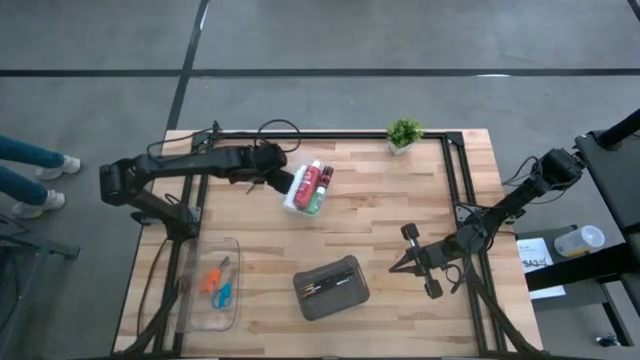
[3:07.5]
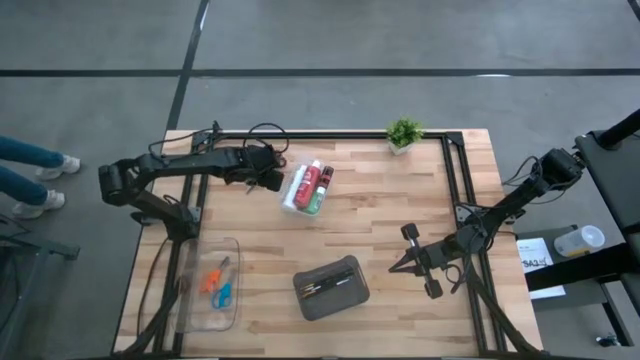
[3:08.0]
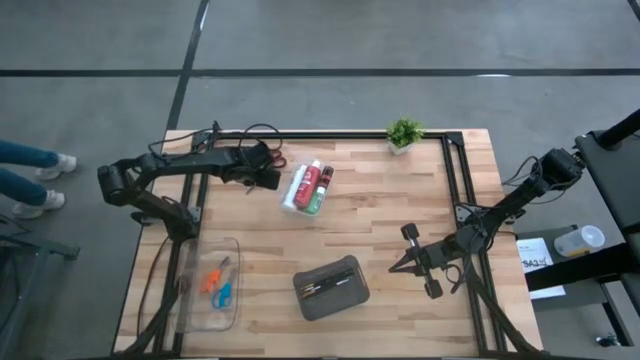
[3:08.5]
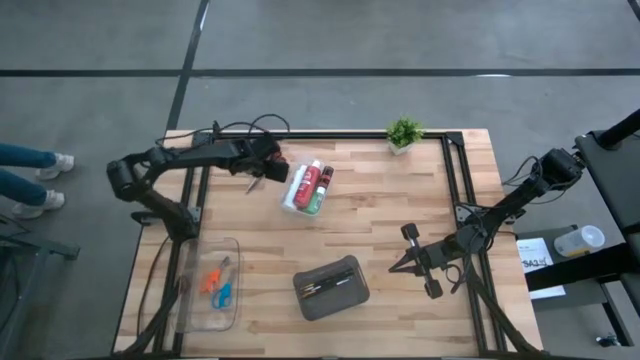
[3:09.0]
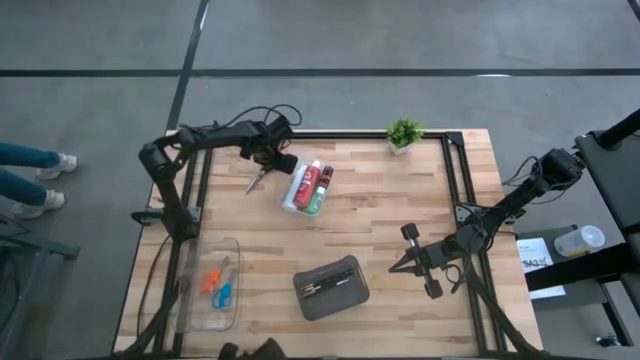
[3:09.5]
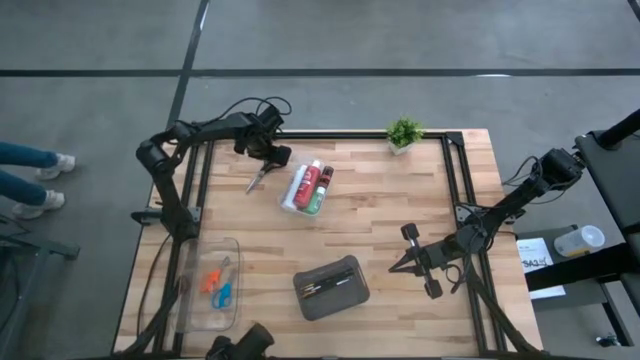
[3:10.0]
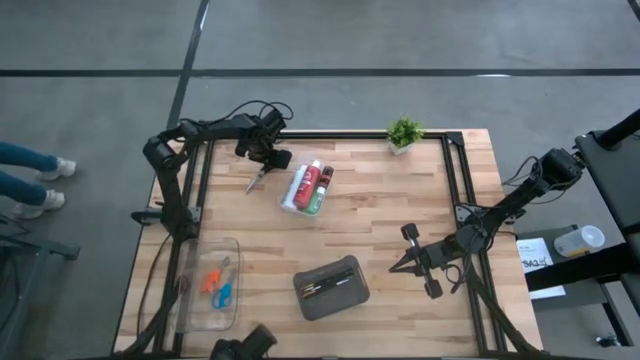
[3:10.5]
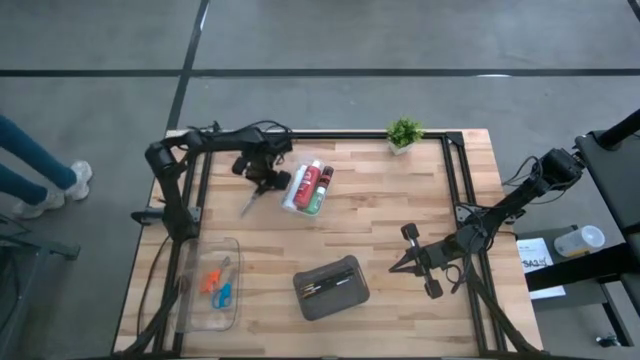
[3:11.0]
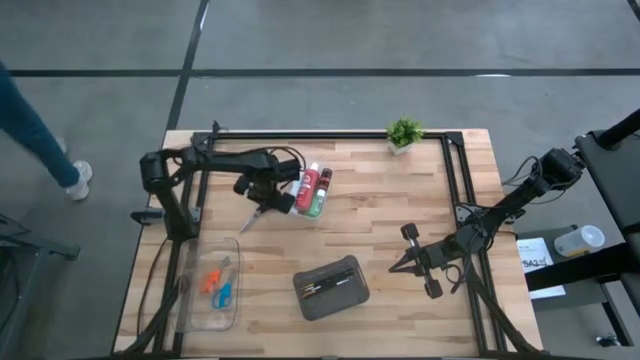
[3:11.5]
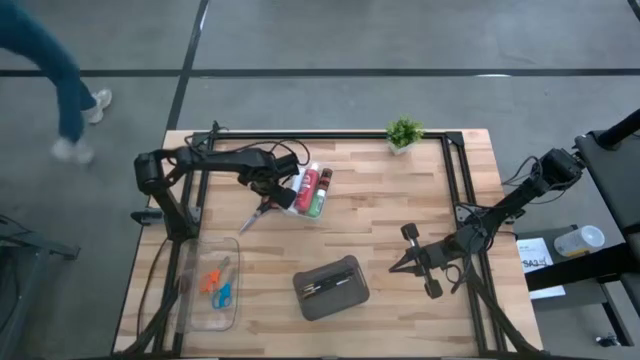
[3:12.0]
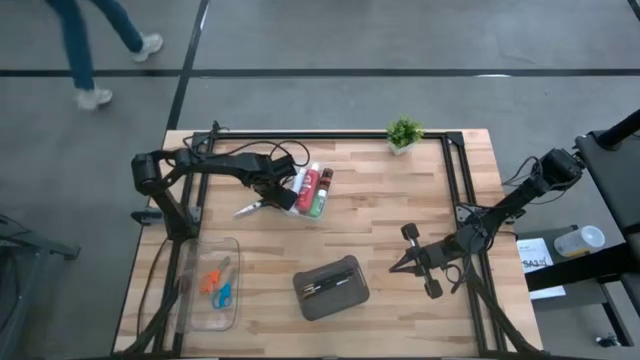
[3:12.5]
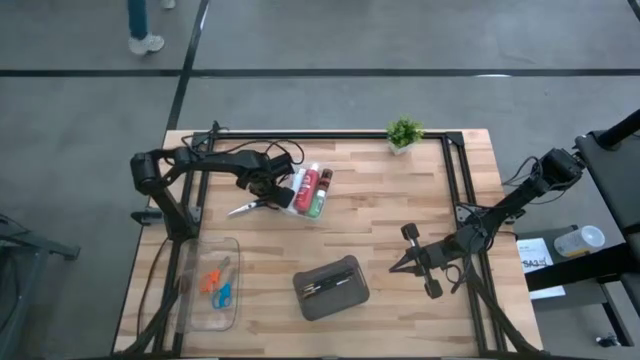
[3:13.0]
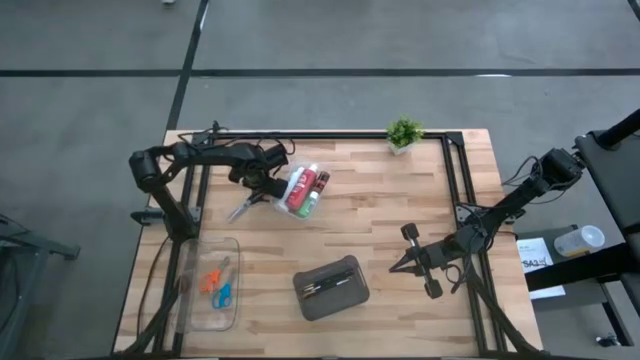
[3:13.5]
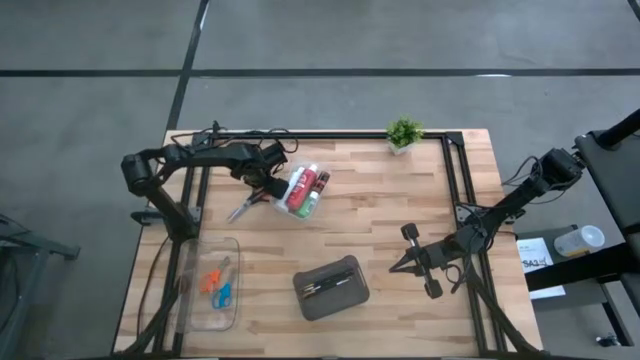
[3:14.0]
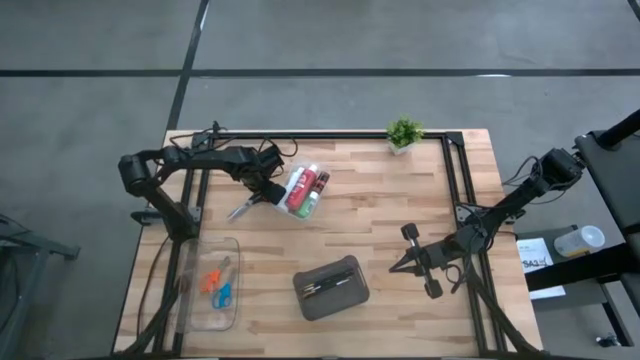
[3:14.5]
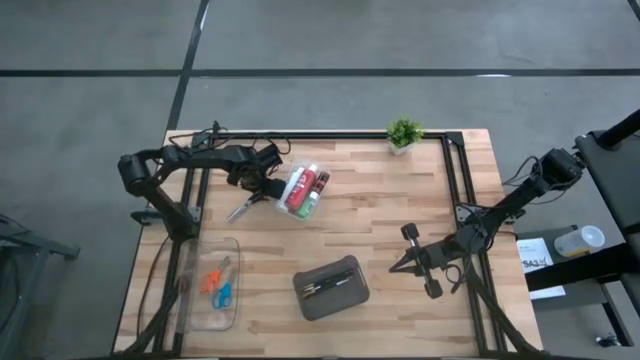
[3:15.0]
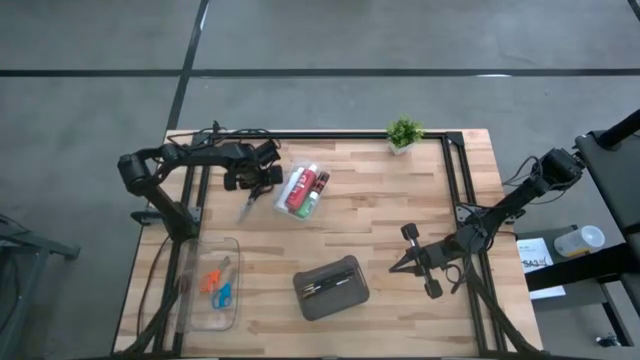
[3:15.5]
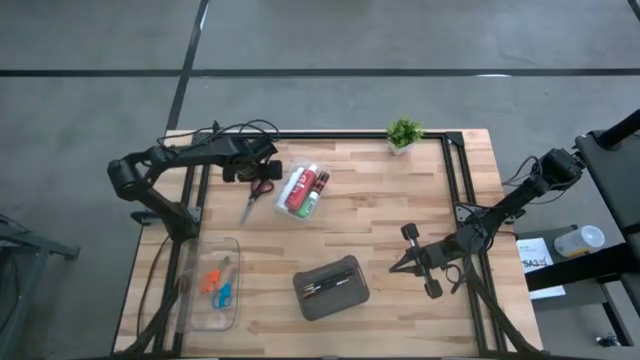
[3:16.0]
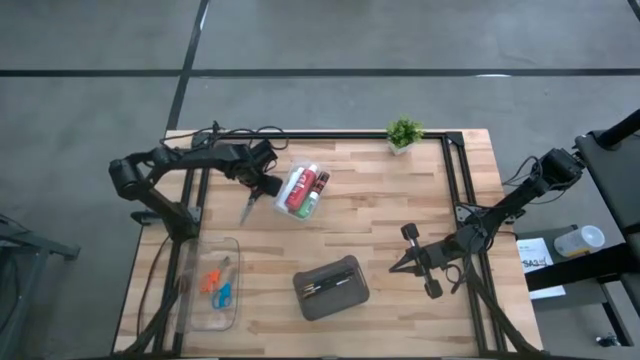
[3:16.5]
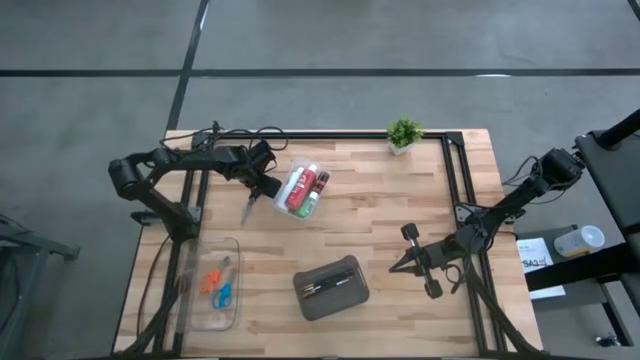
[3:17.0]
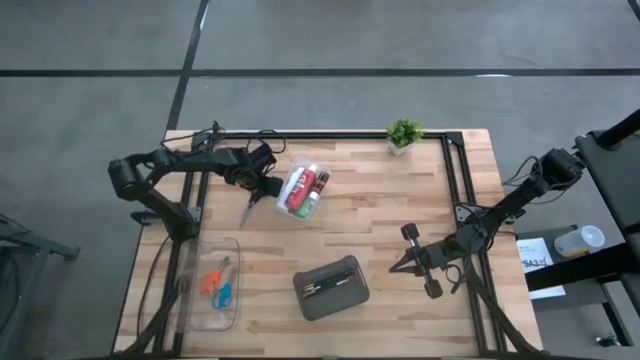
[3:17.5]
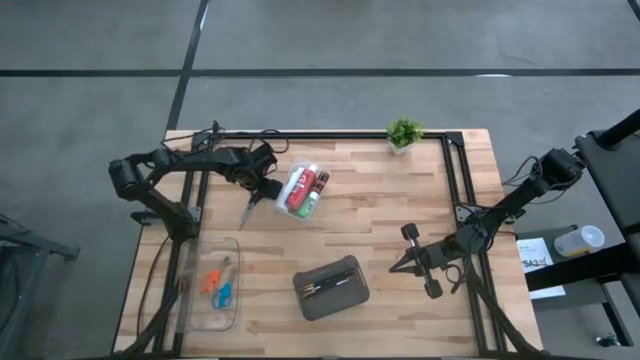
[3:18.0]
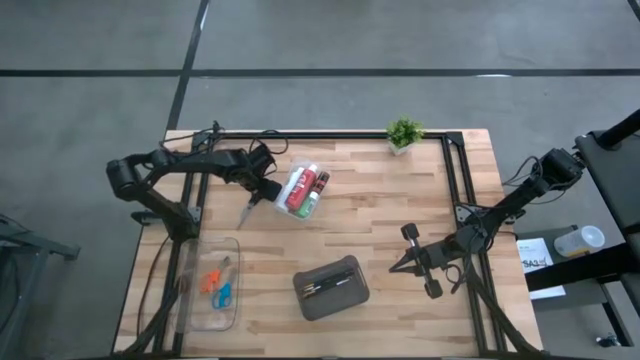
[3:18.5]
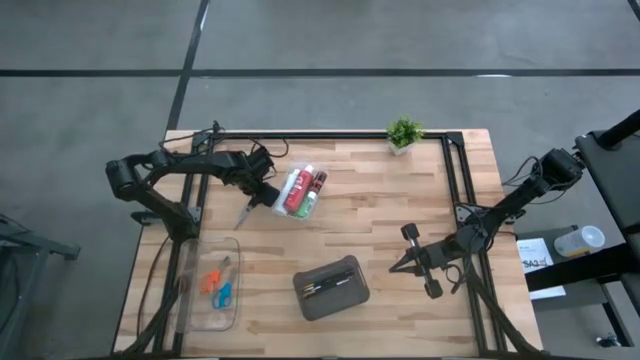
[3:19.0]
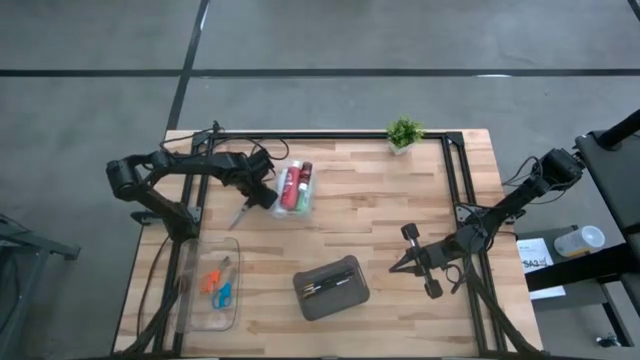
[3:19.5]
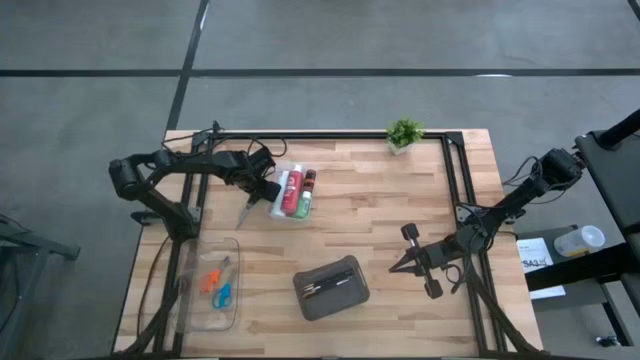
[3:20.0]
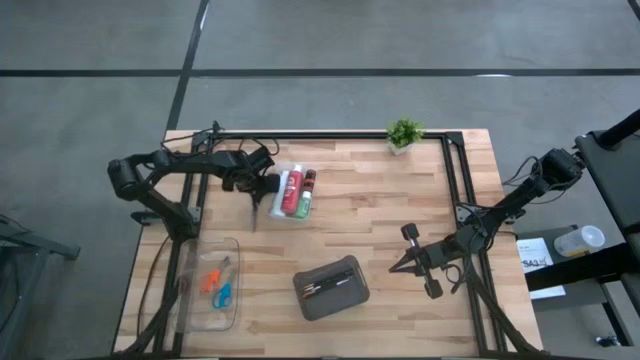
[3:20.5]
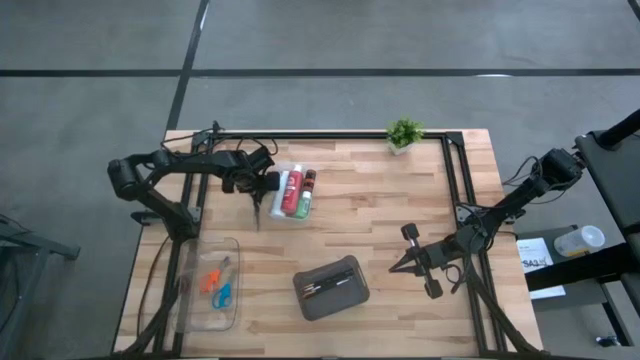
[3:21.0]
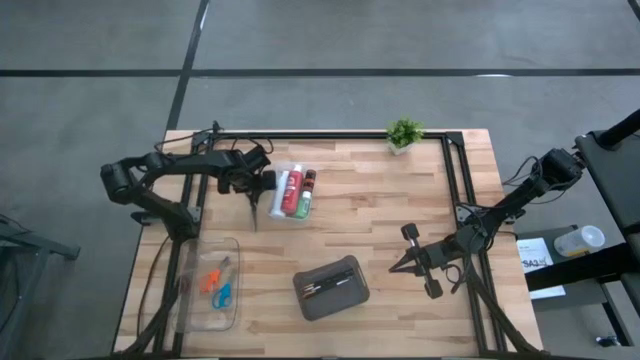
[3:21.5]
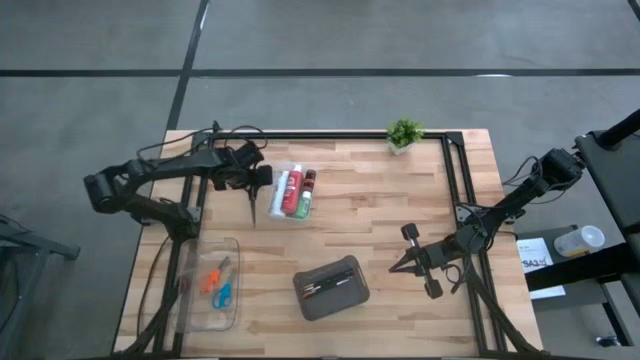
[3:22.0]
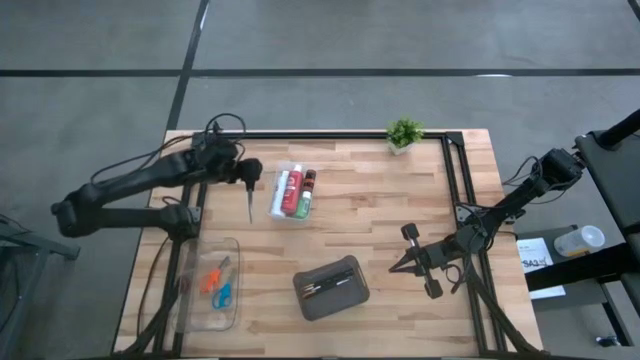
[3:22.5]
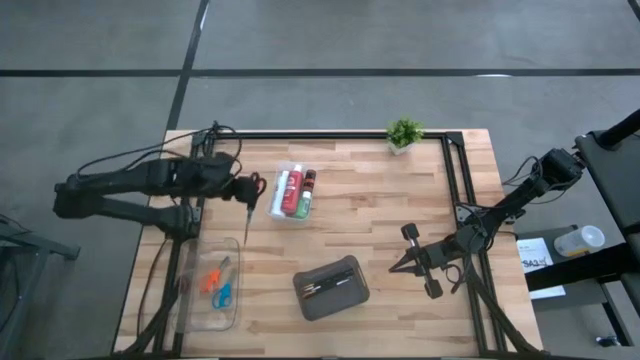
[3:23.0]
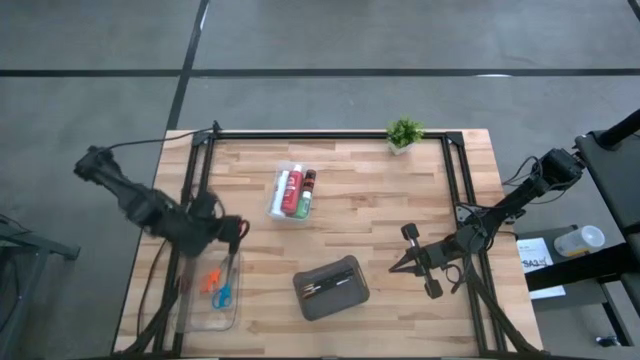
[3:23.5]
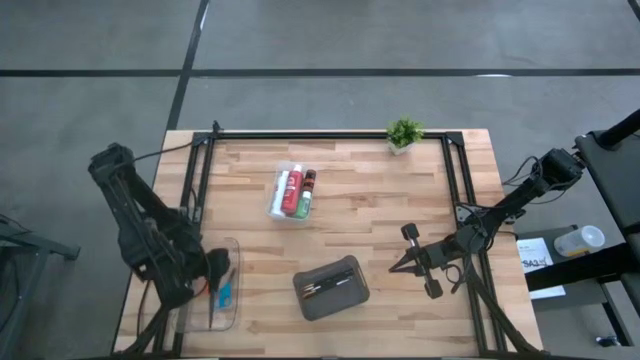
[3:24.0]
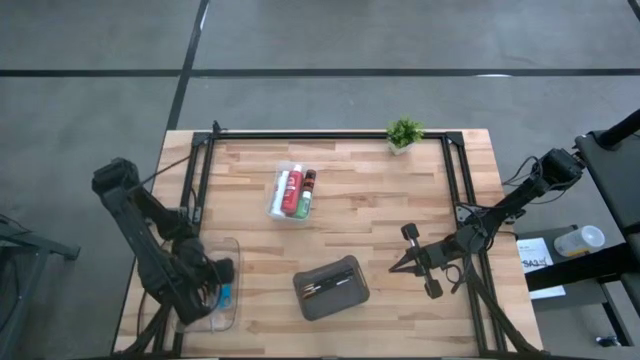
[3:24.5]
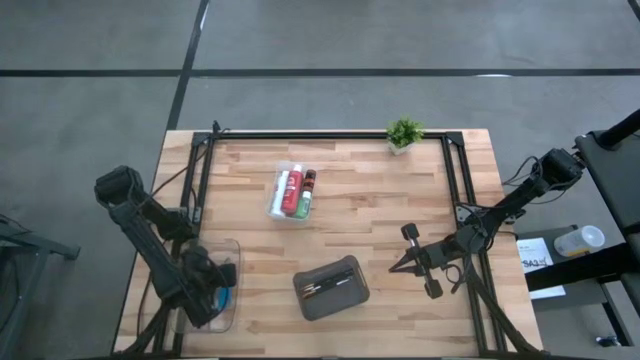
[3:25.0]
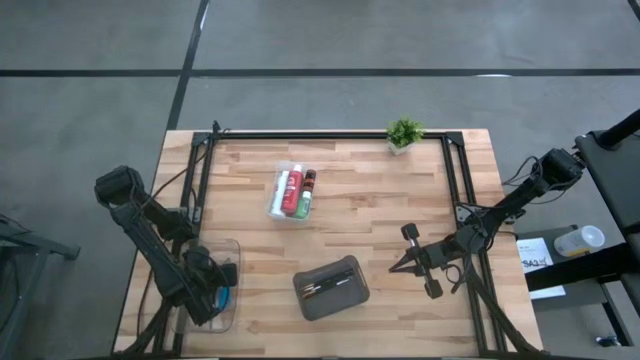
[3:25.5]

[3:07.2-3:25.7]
Task: Pick & Place Paint Supplies
Put the black scissors into the bottom transparent bin

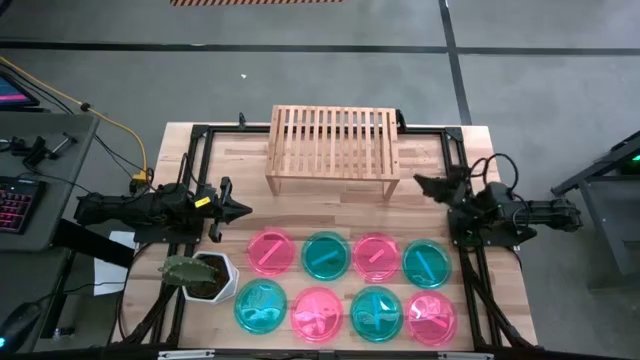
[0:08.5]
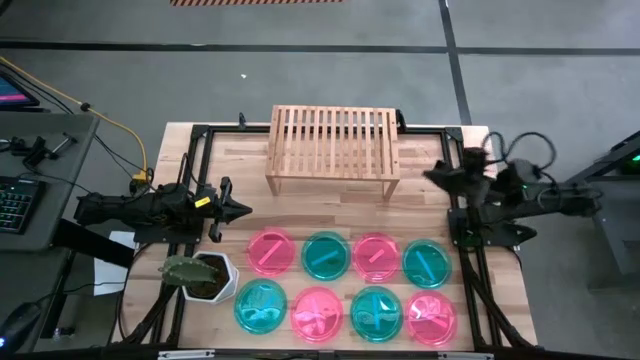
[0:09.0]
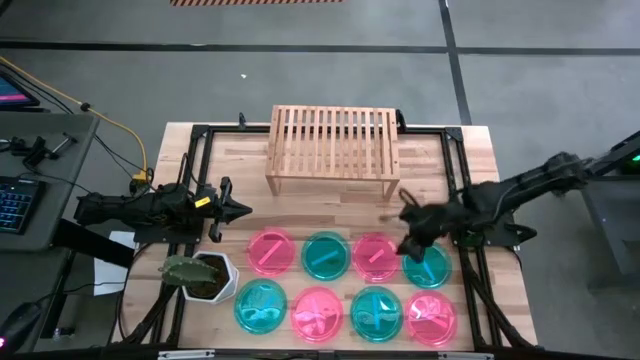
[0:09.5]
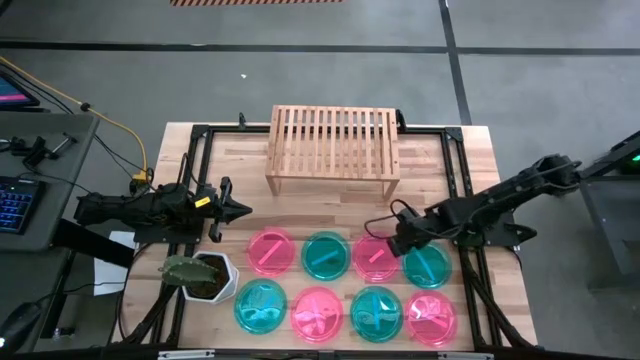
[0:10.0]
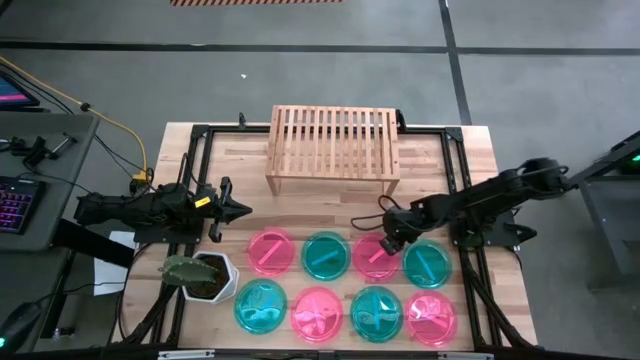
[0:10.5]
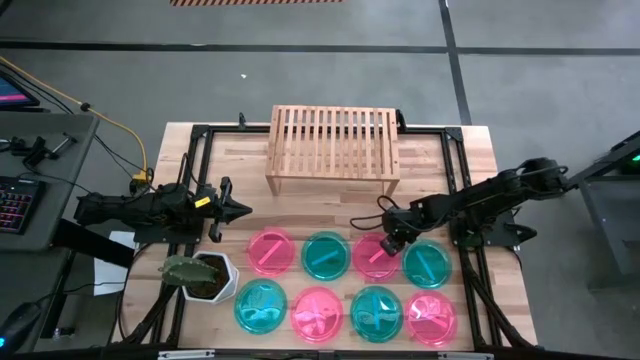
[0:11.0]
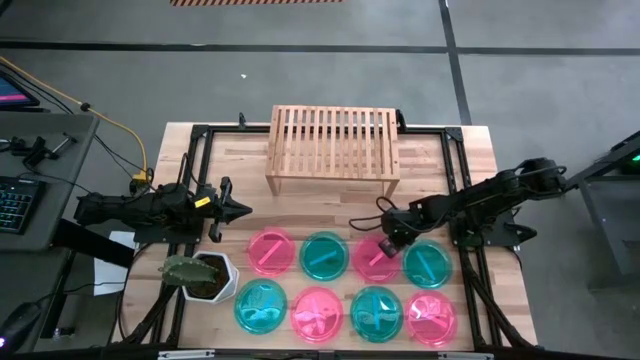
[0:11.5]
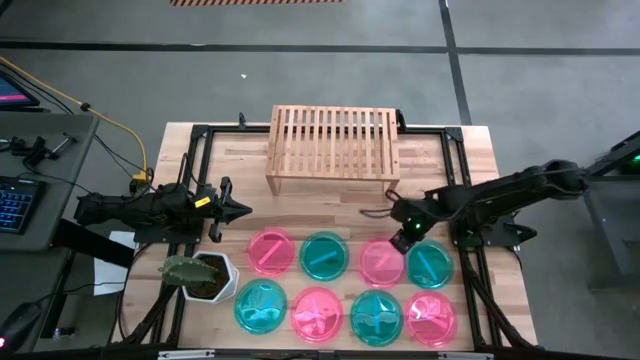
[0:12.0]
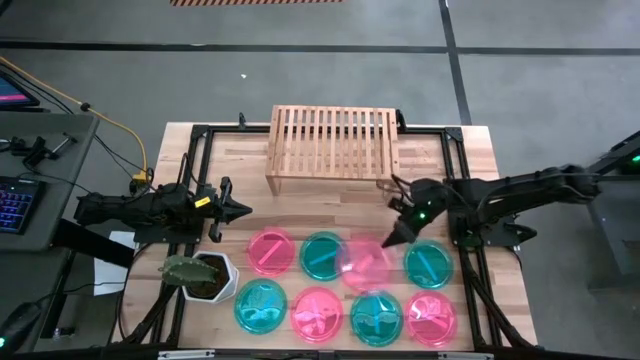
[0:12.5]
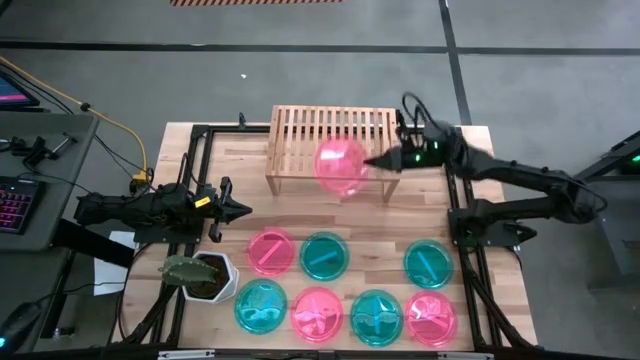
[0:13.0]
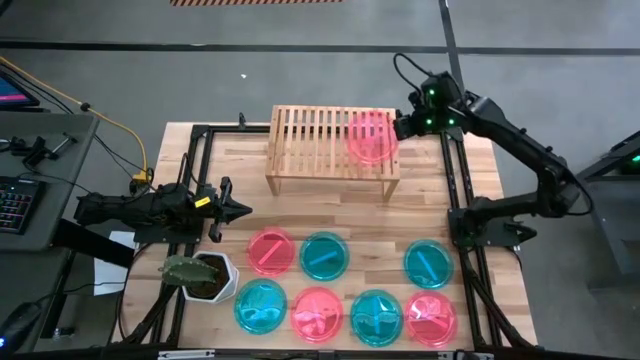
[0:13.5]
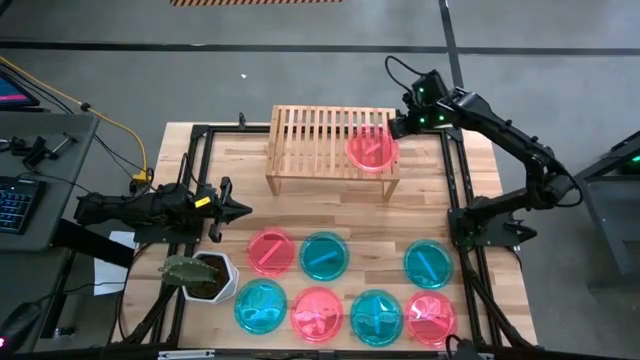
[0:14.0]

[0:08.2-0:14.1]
Task: Place and stack plates onto a shelf
Put the top right pink plate on the shelf
